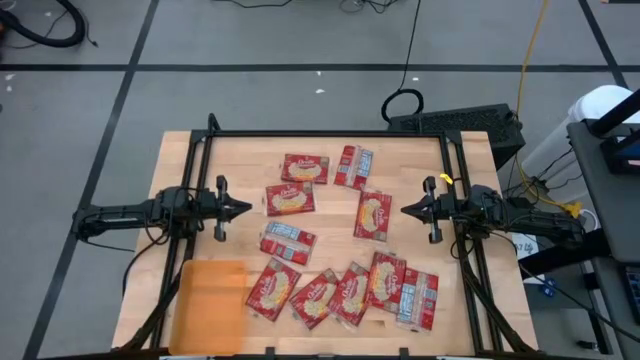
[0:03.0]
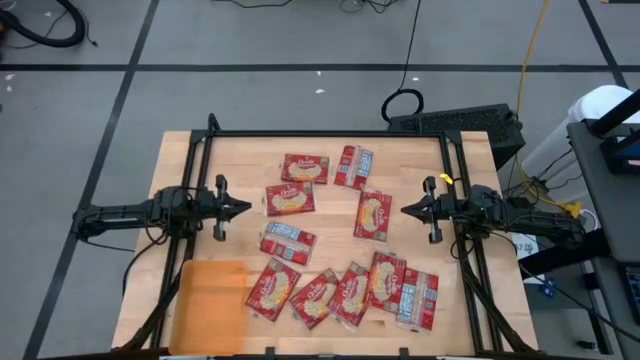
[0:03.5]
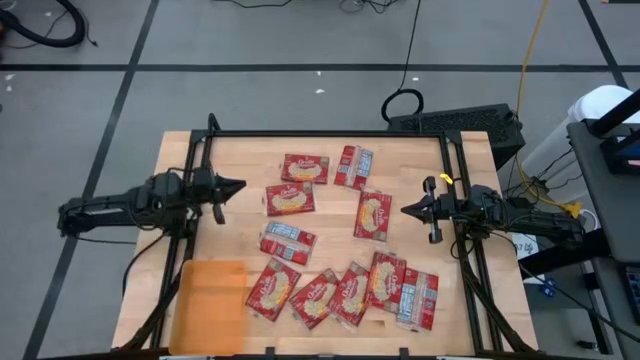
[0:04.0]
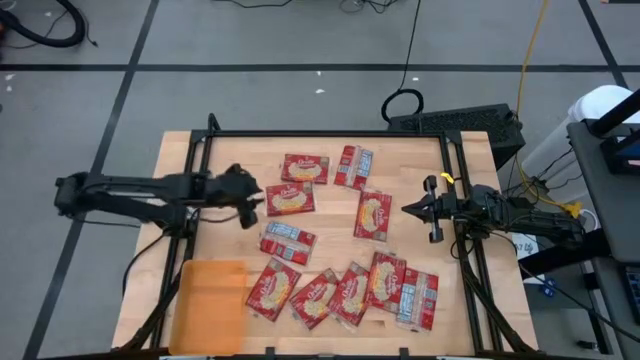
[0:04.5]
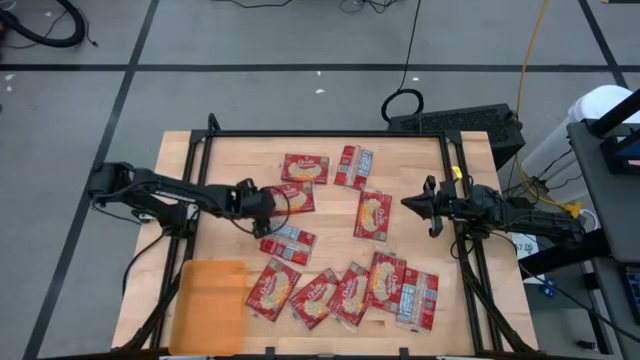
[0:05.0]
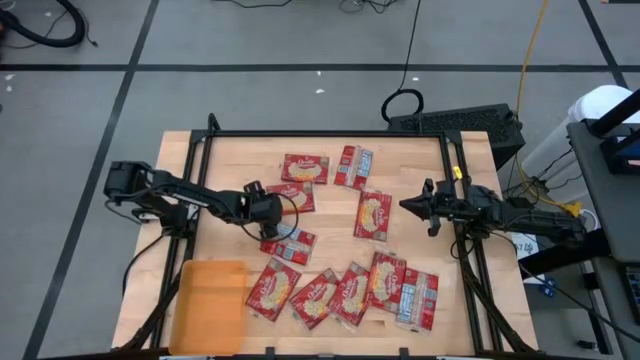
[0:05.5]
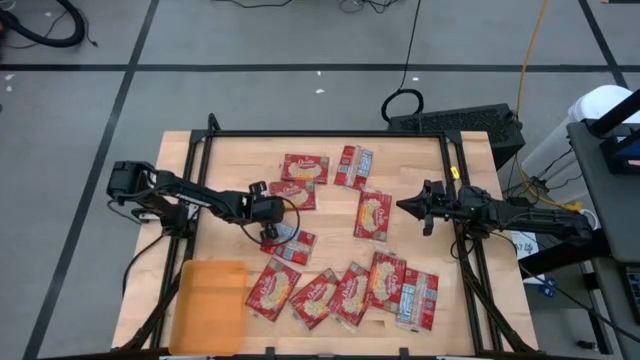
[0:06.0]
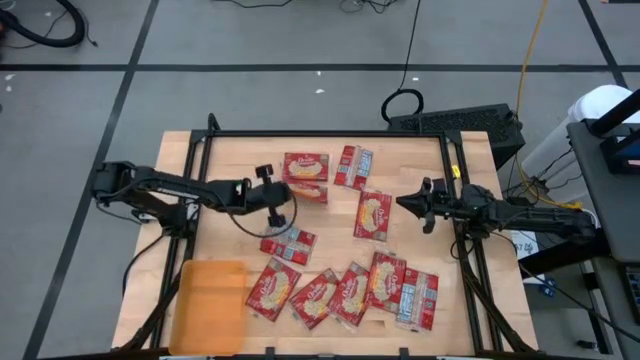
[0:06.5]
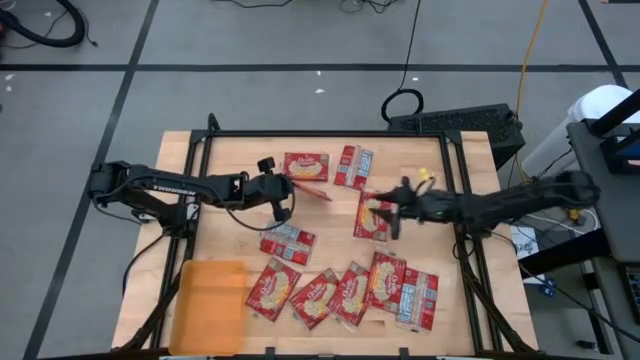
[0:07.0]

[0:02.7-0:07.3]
Task: Sort popcorn bags into baskets
Put the red popcorn bag into the orange bin

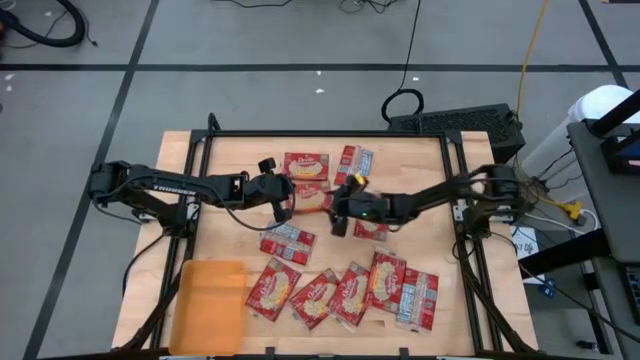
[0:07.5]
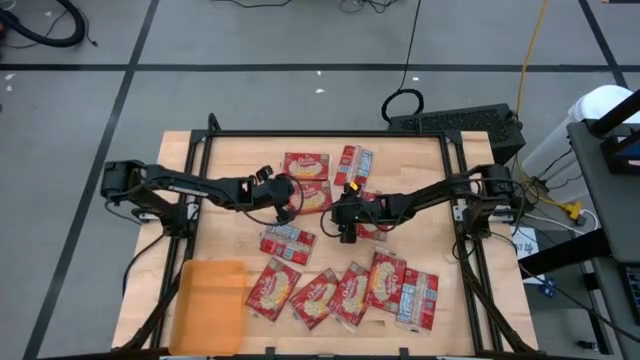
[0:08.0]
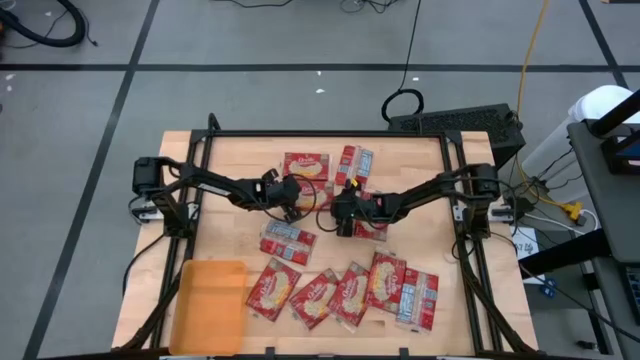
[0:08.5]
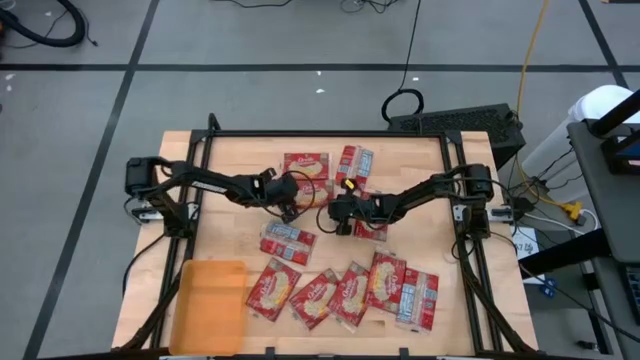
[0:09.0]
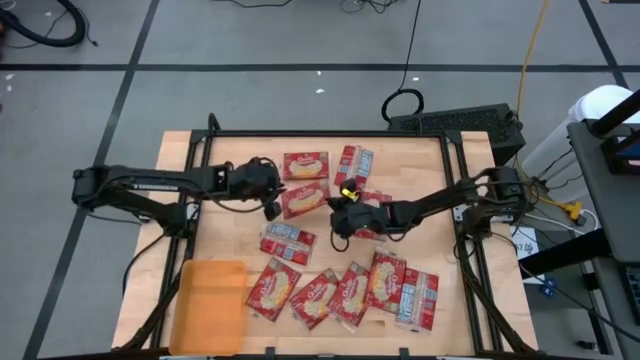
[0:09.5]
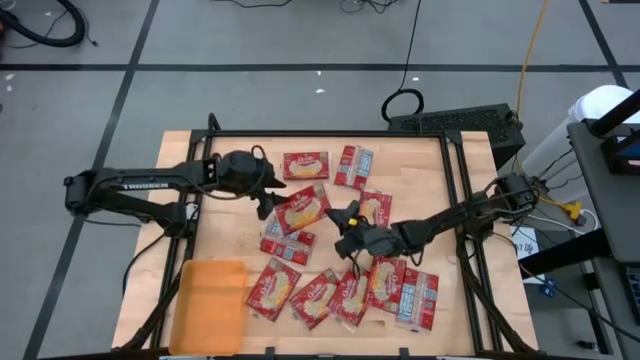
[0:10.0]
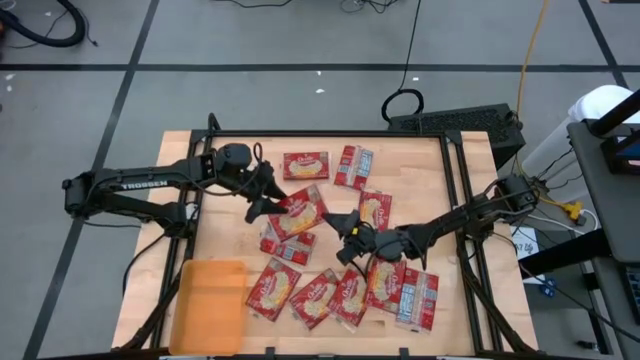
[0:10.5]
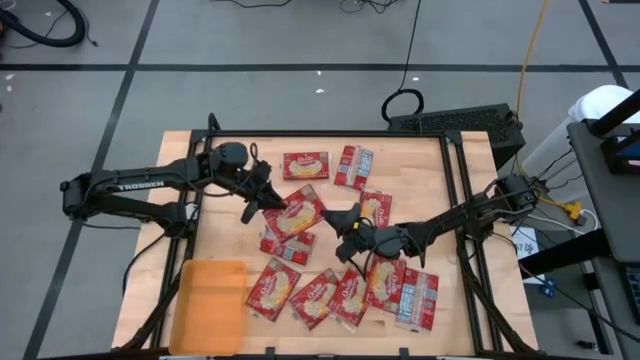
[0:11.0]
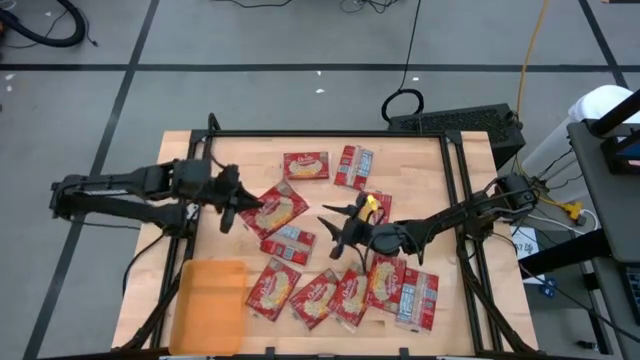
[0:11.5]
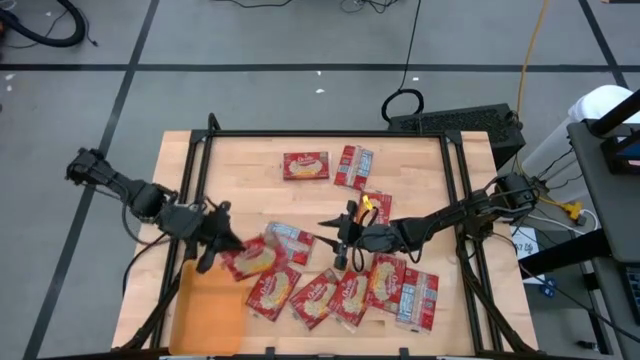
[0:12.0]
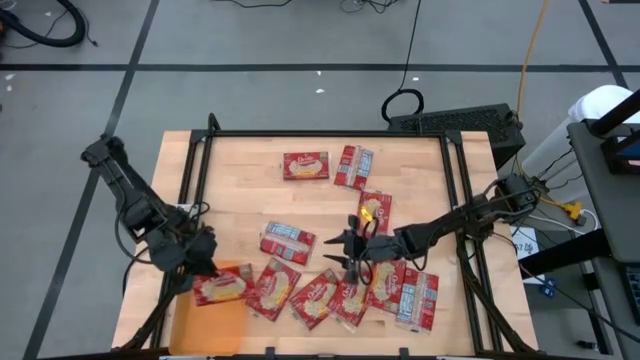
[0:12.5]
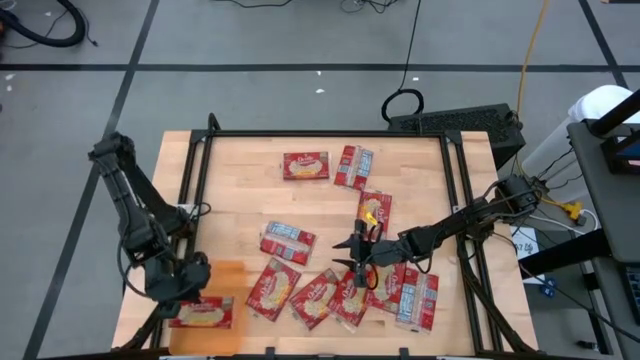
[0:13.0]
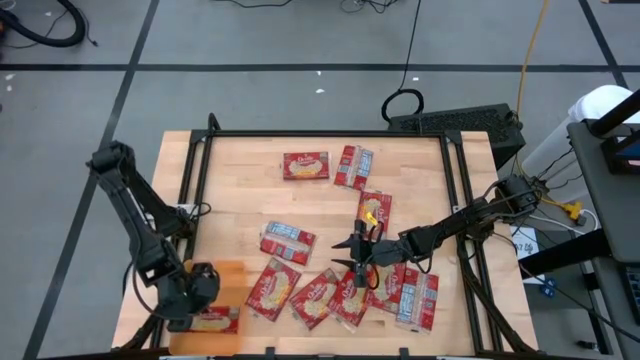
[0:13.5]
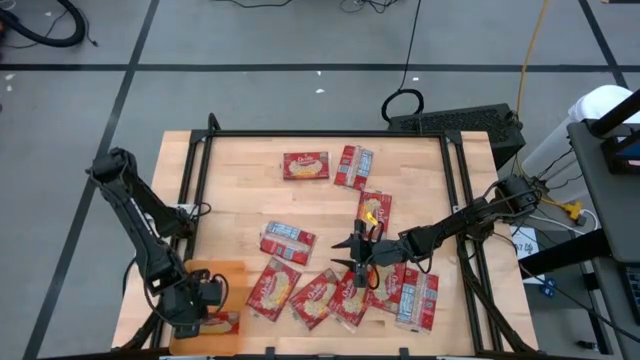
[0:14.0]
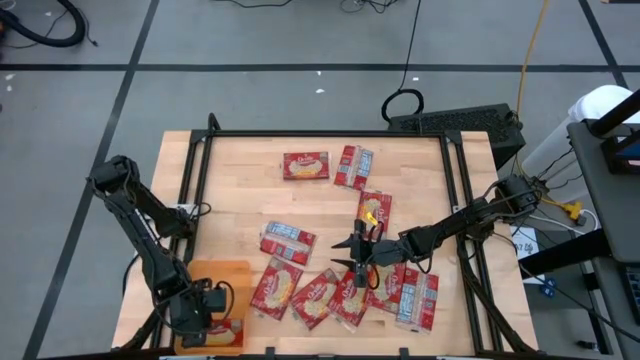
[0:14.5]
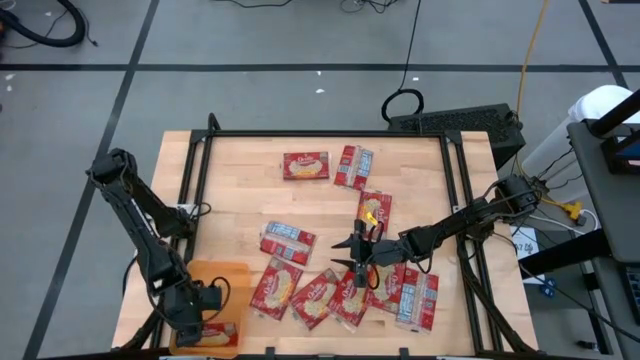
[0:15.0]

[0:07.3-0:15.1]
Put the red popcorn bag into the orange bin

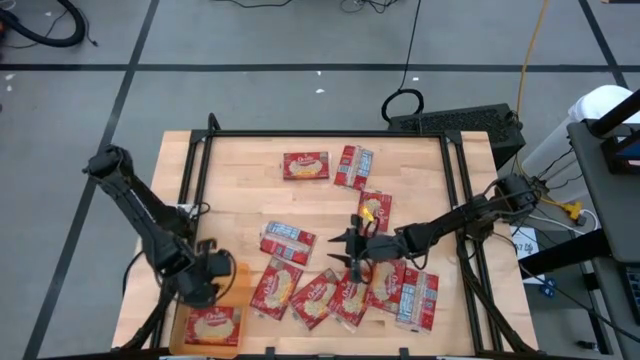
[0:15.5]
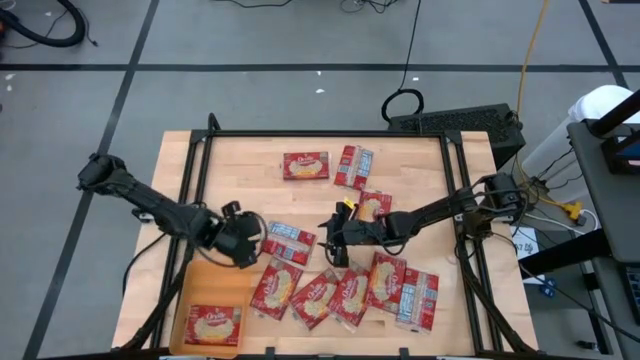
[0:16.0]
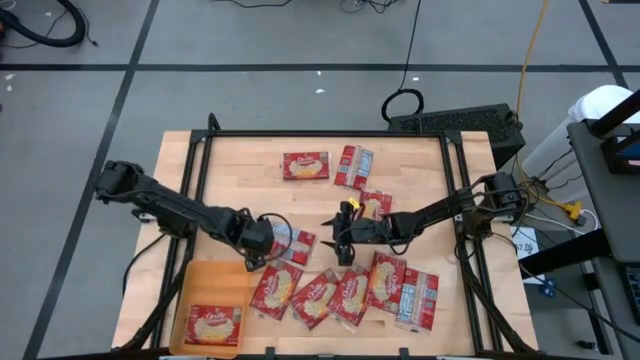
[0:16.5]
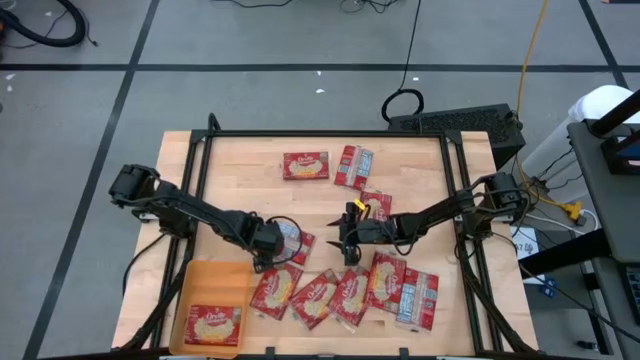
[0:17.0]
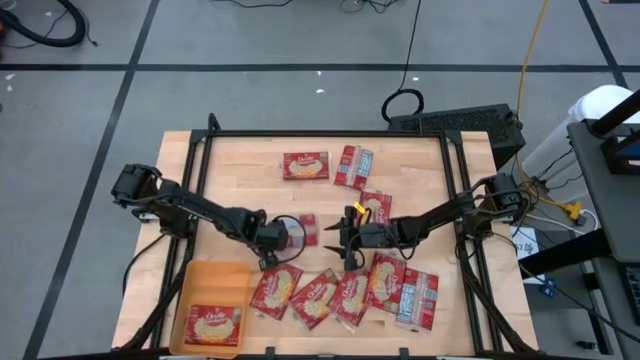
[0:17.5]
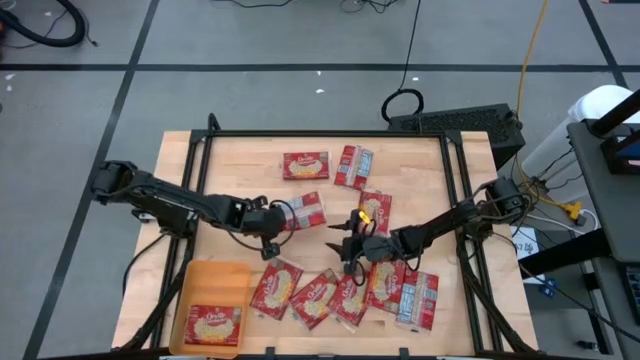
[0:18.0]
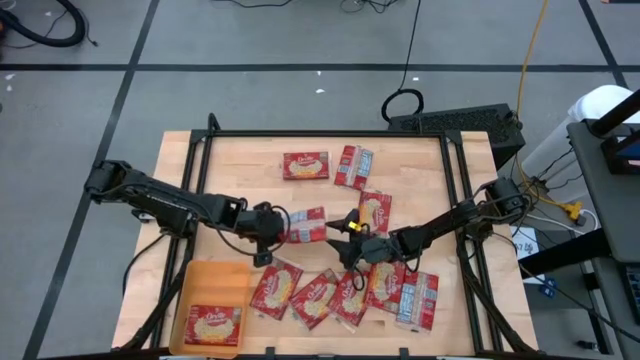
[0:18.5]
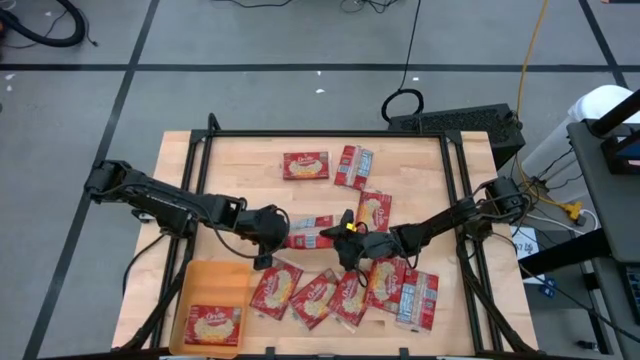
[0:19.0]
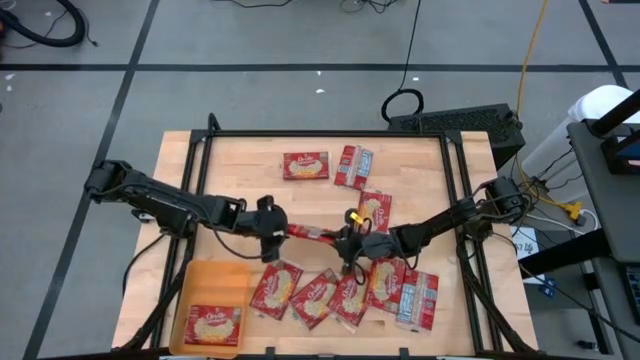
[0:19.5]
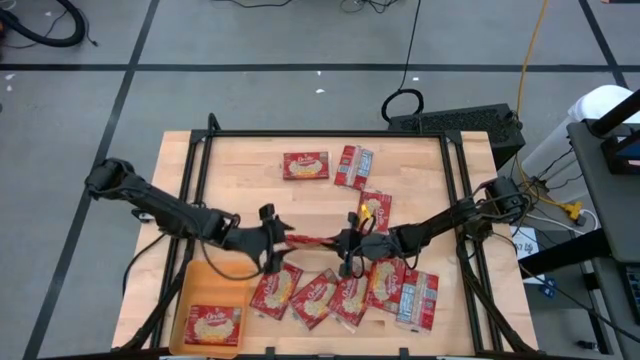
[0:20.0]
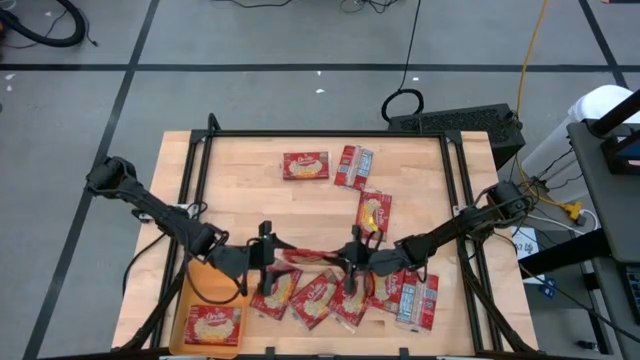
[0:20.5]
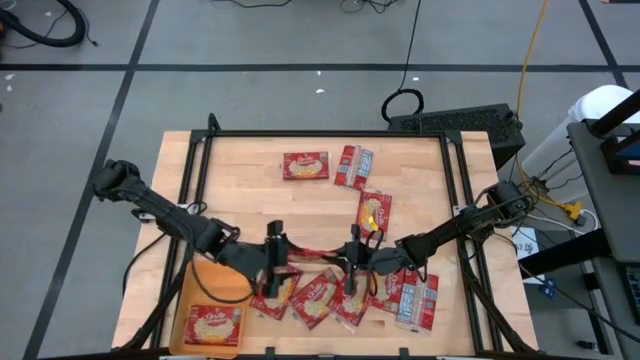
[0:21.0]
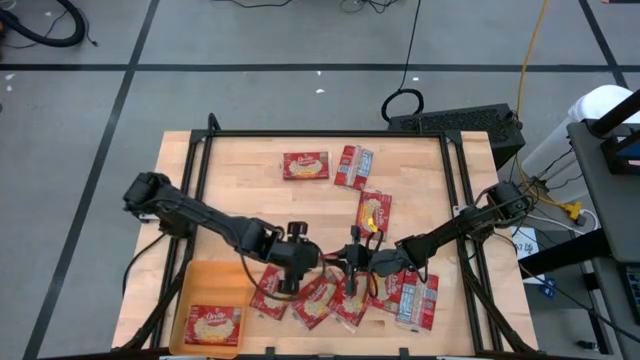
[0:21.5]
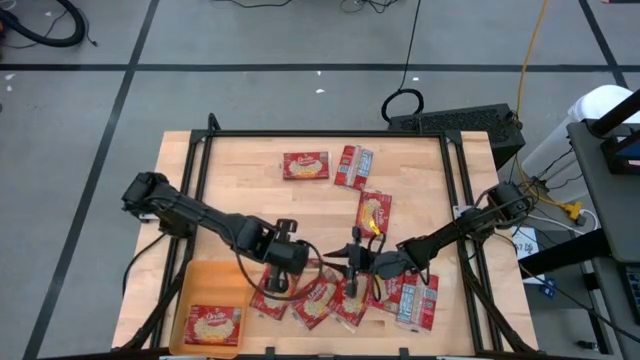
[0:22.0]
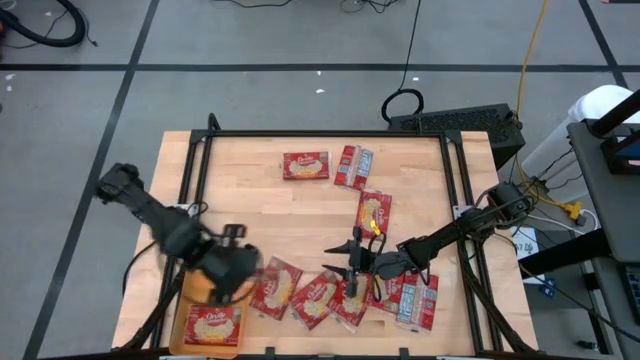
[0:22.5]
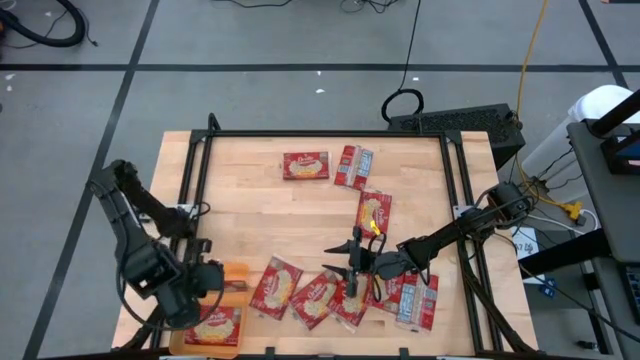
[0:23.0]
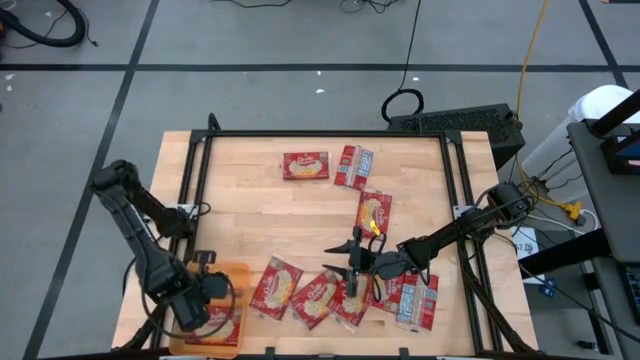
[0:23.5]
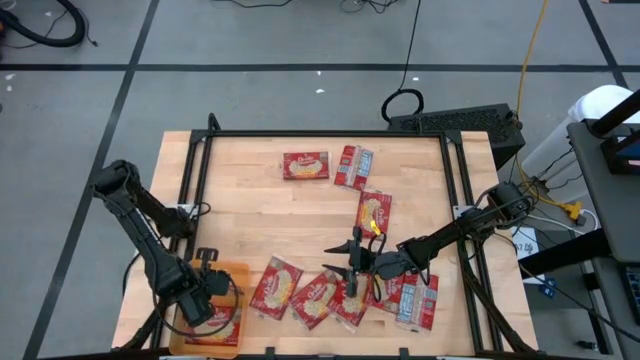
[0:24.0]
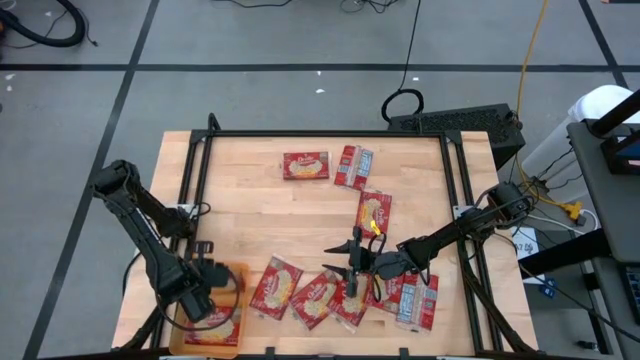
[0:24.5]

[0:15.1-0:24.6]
Put the red popcorn bag into the orange bin
